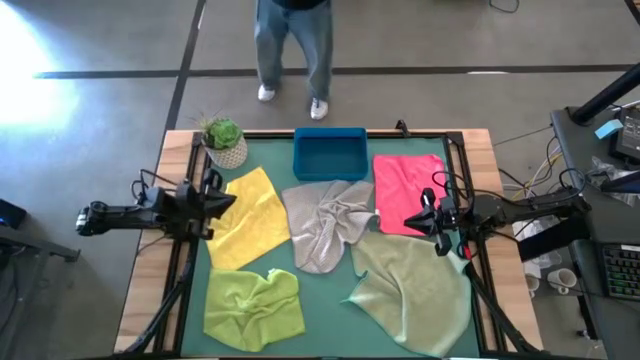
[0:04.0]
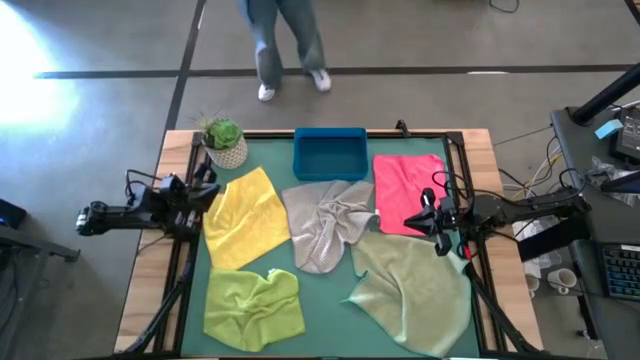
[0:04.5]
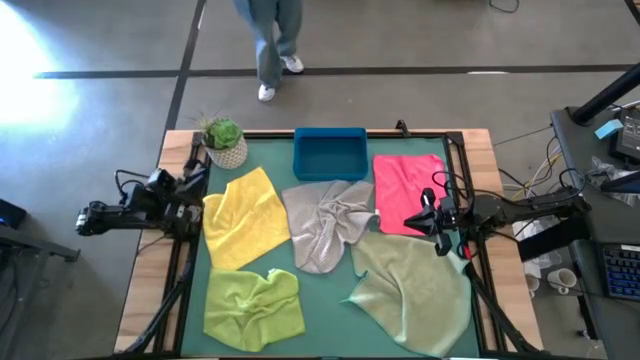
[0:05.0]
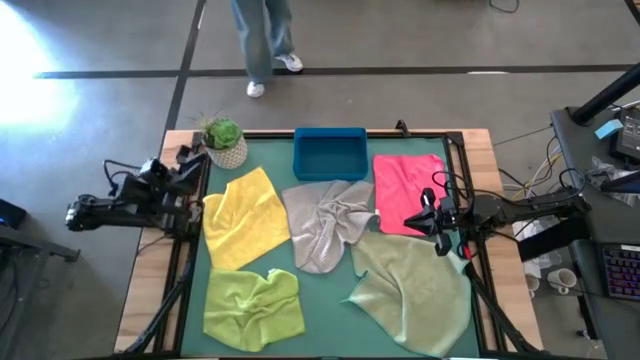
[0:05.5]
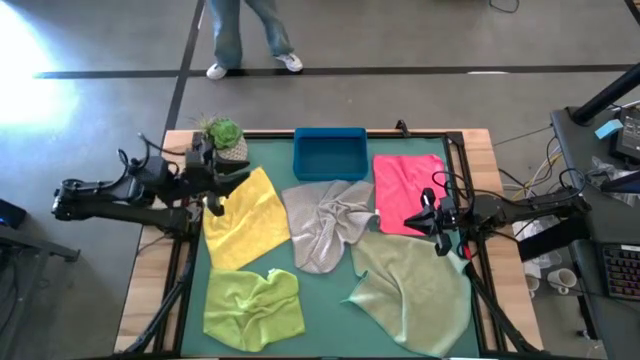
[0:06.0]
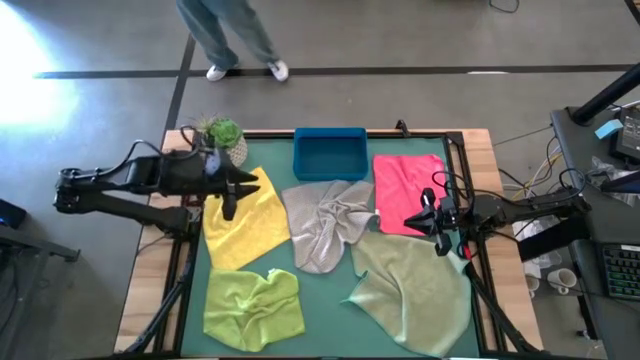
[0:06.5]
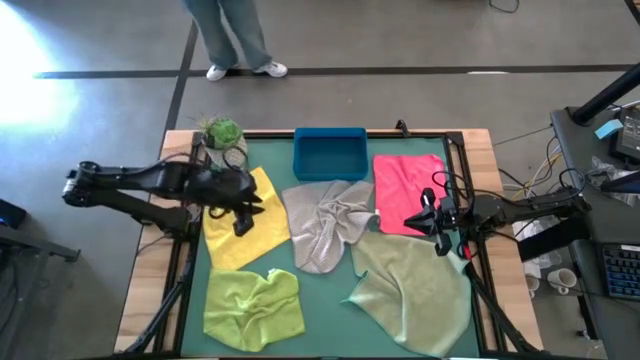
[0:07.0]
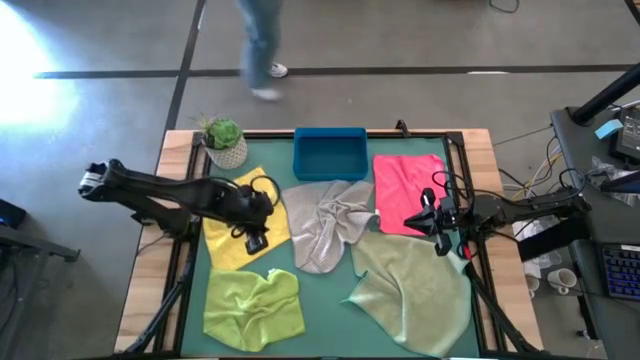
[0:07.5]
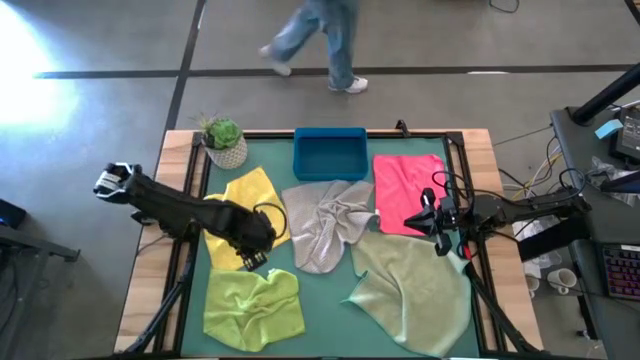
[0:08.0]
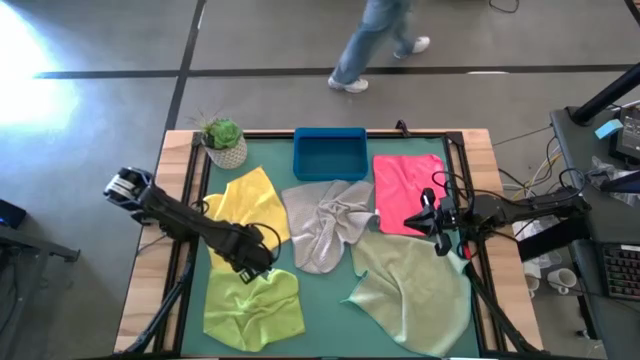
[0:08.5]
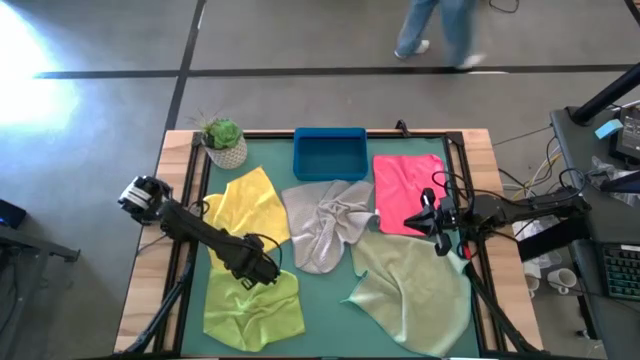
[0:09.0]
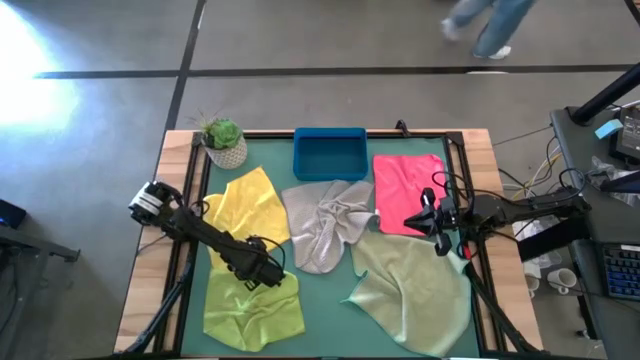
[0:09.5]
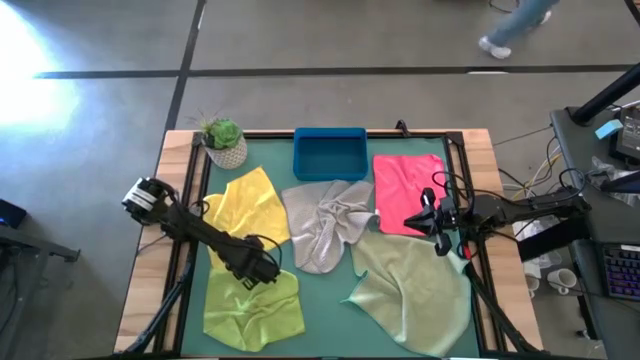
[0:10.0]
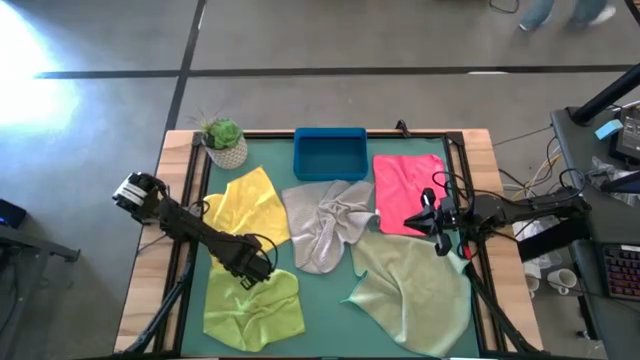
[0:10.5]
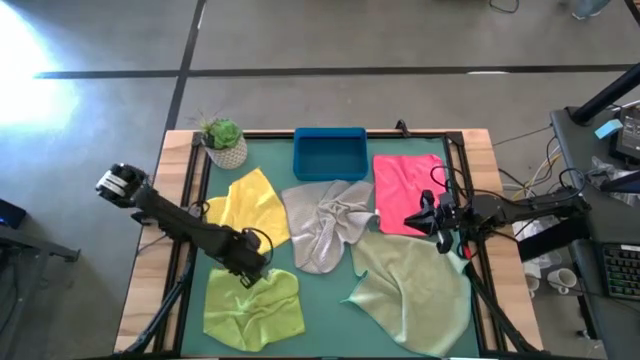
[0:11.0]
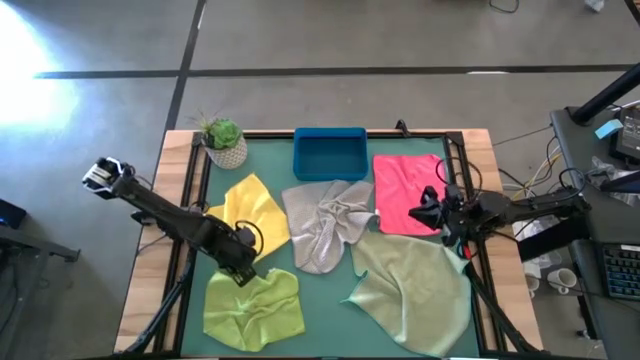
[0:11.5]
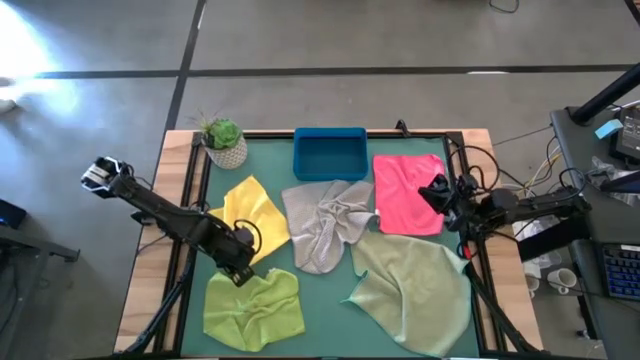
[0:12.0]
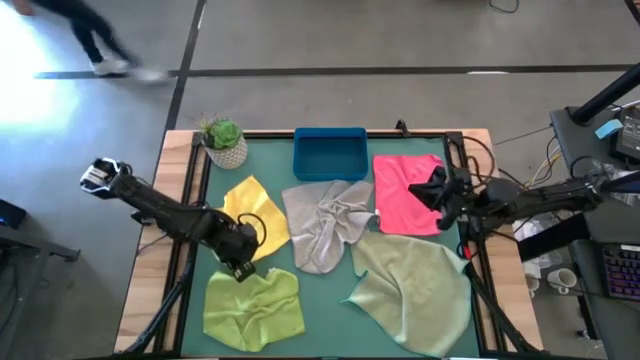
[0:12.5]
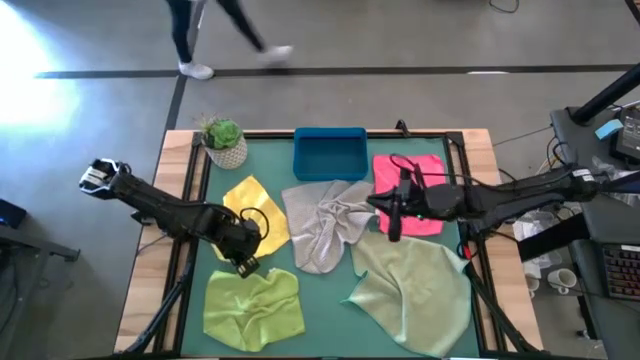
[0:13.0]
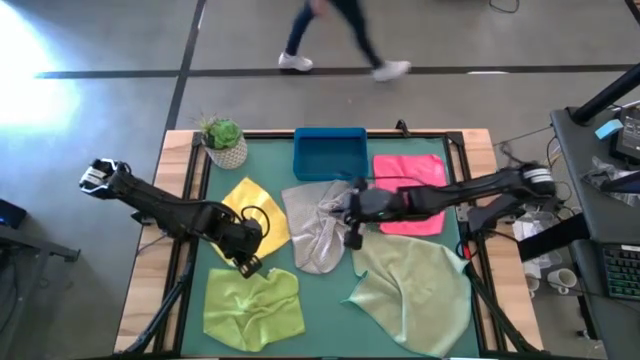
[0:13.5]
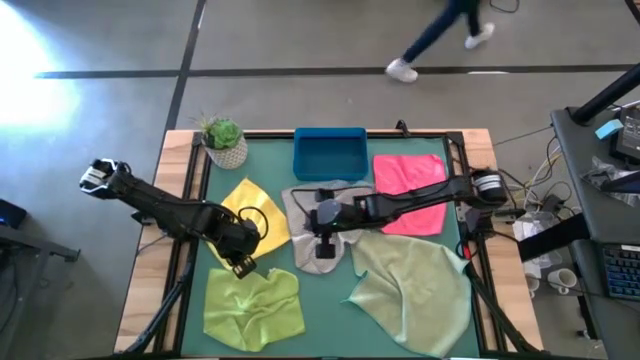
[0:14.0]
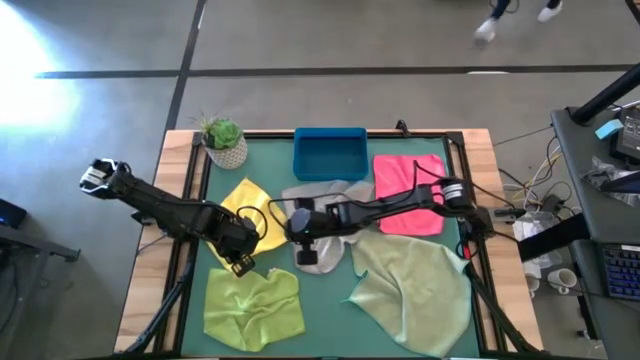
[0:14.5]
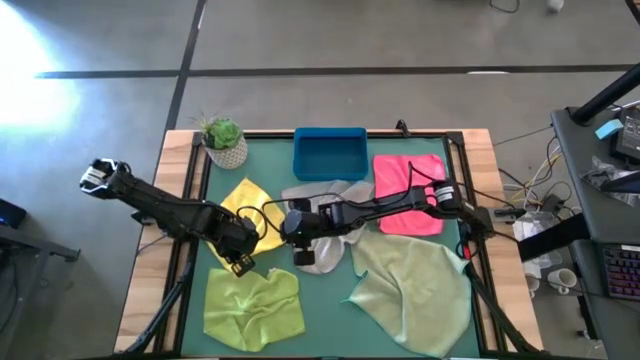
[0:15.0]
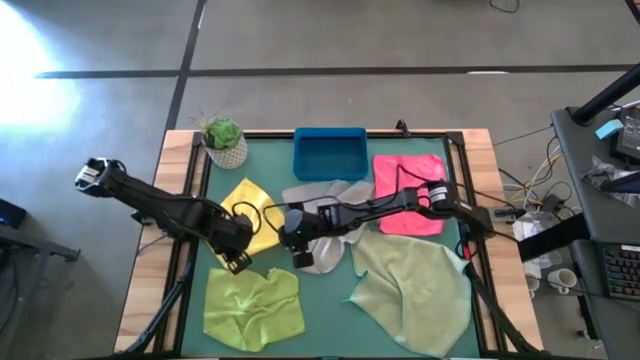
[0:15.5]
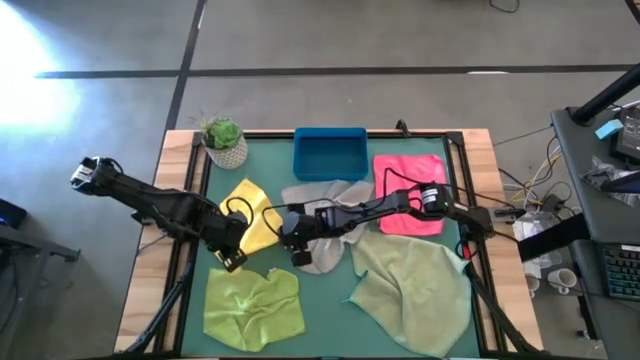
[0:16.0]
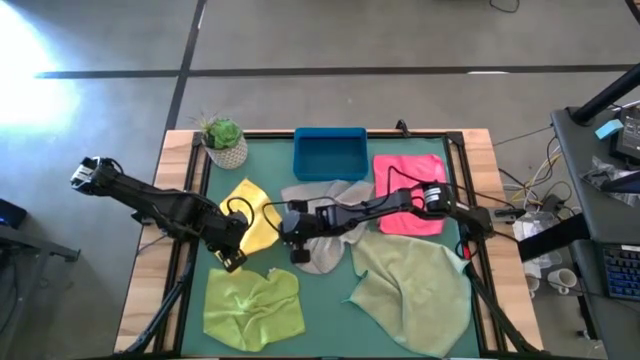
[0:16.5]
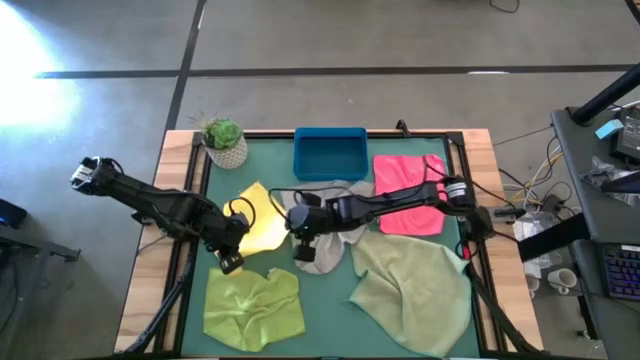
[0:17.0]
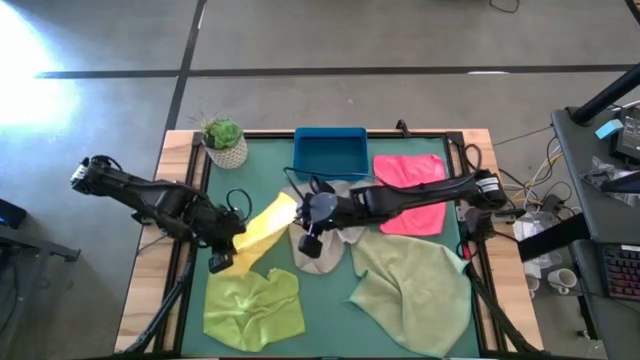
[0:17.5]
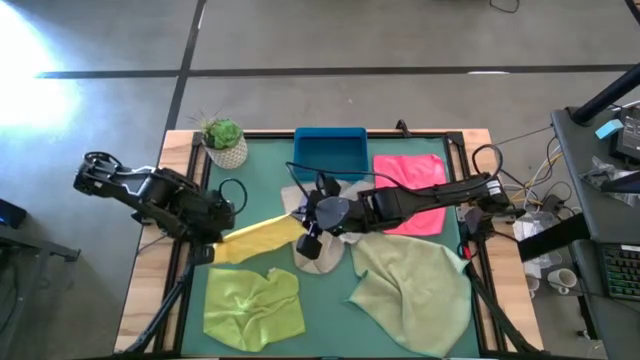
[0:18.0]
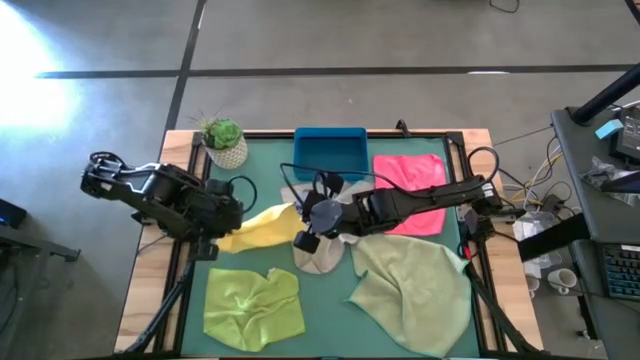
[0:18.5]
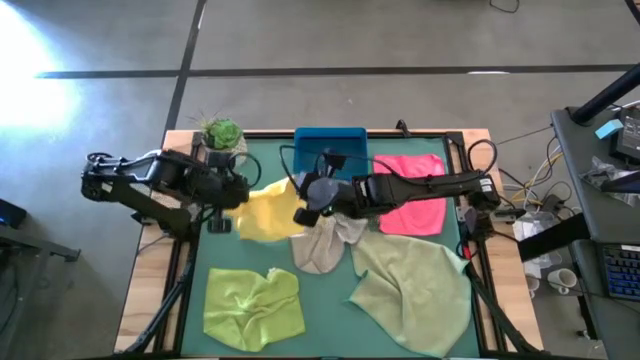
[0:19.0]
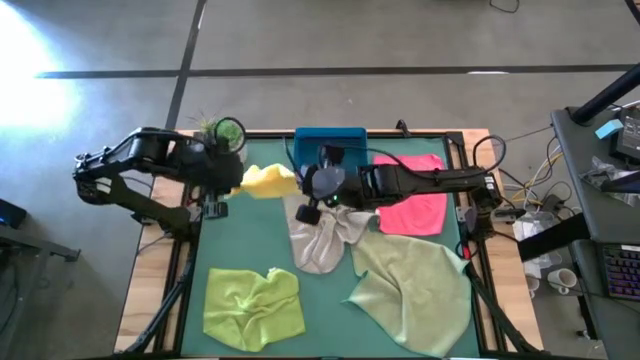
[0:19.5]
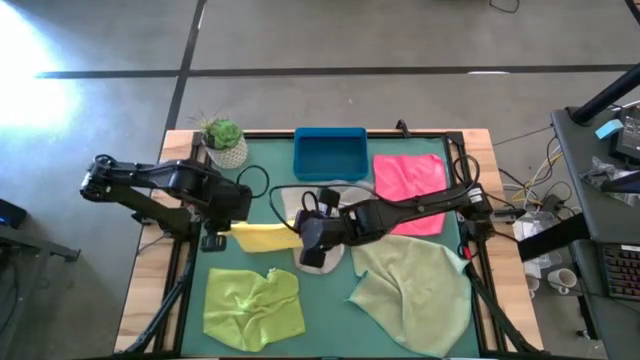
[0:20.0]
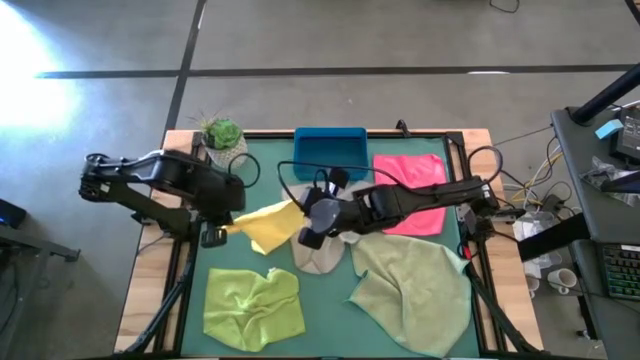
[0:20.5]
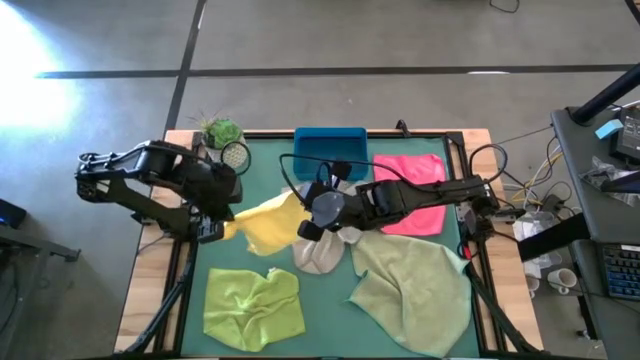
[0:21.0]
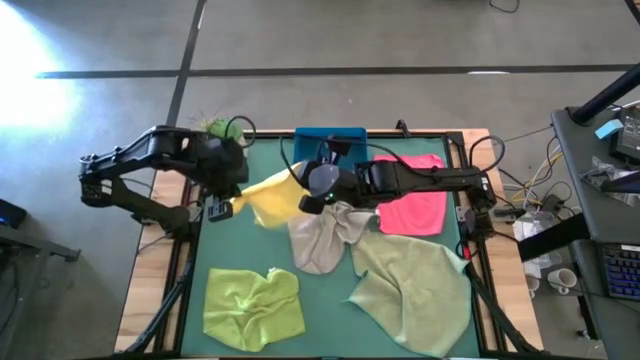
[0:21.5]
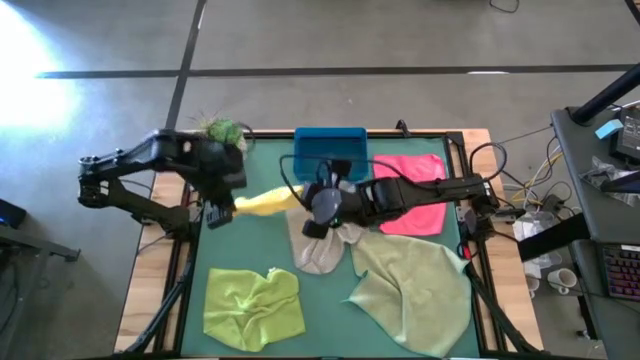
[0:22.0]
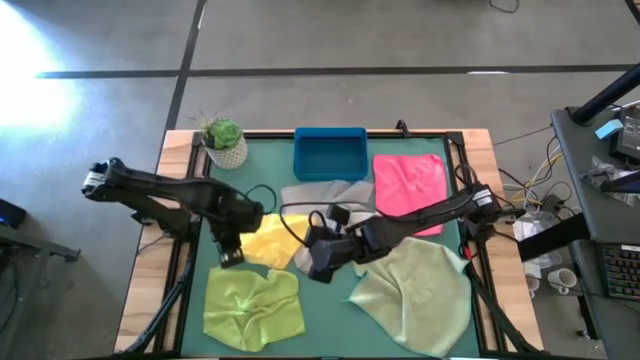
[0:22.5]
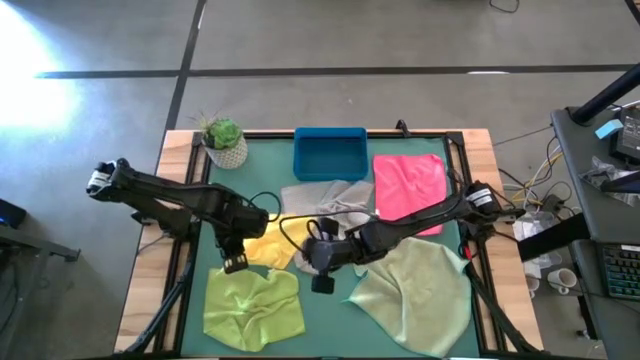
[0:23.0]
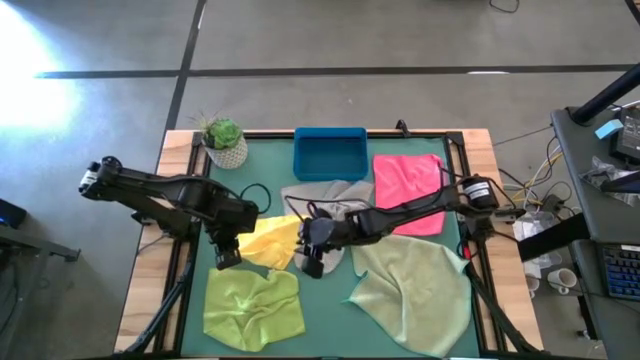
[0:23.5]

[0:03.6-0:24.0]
Task: Fold microfiber towels
Fold the yellow microfiber cloth
